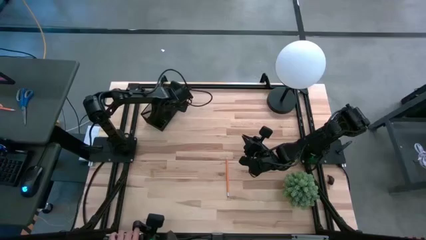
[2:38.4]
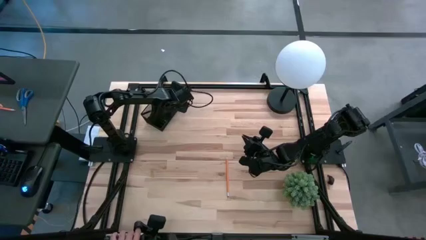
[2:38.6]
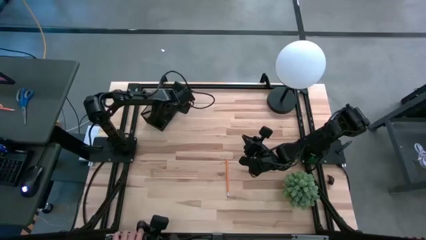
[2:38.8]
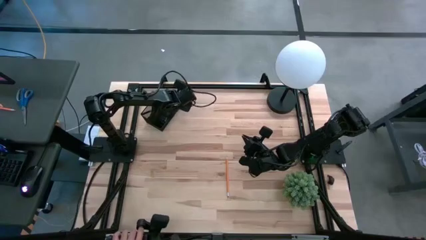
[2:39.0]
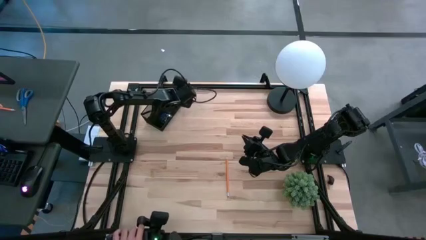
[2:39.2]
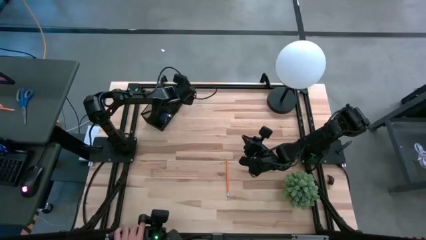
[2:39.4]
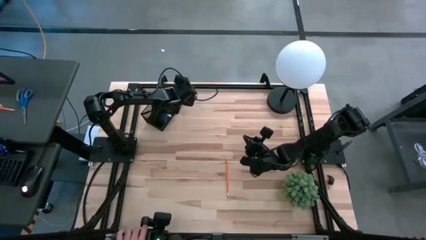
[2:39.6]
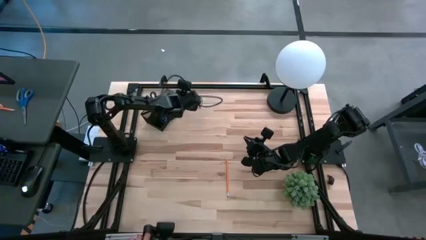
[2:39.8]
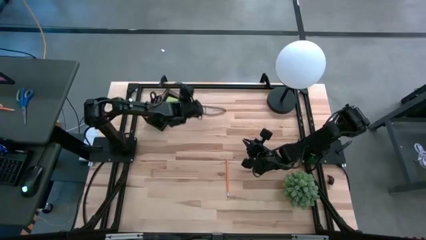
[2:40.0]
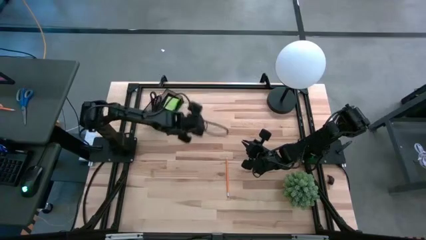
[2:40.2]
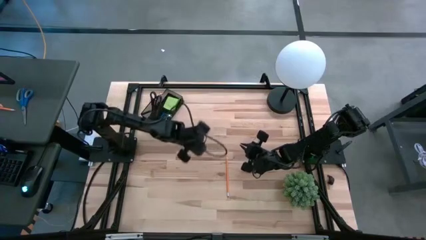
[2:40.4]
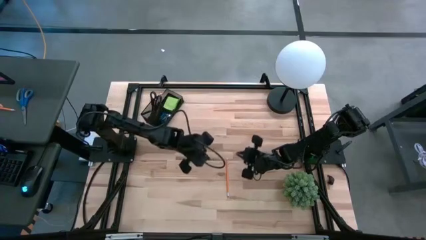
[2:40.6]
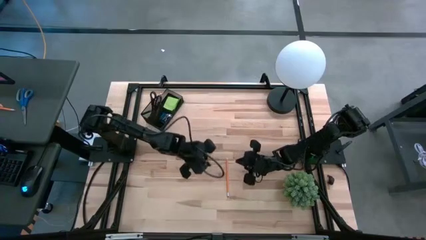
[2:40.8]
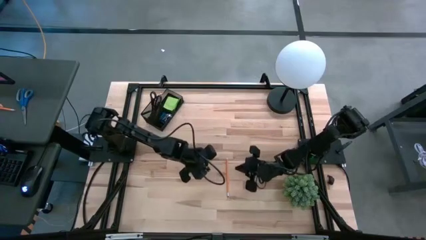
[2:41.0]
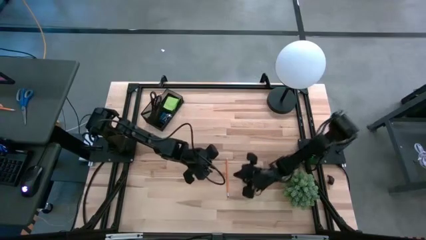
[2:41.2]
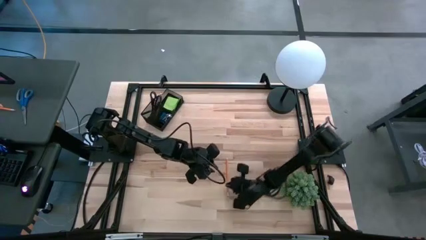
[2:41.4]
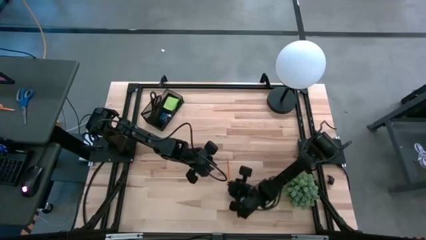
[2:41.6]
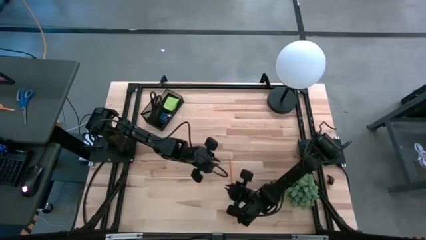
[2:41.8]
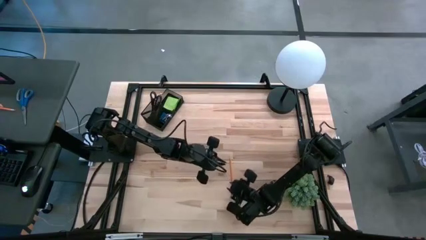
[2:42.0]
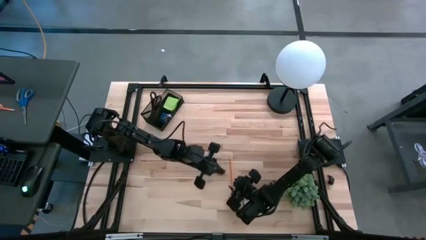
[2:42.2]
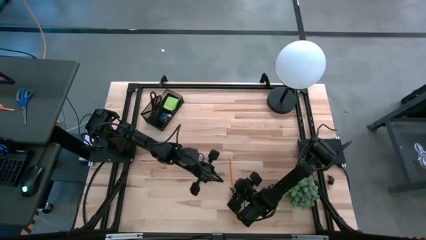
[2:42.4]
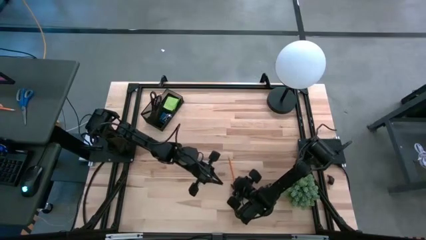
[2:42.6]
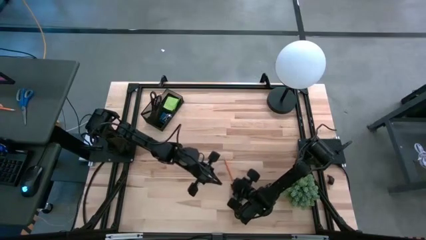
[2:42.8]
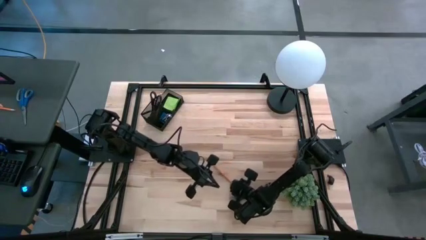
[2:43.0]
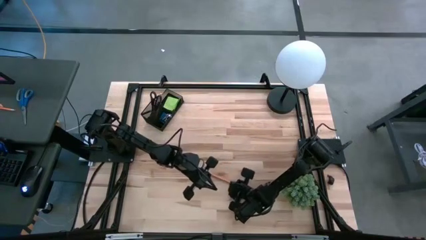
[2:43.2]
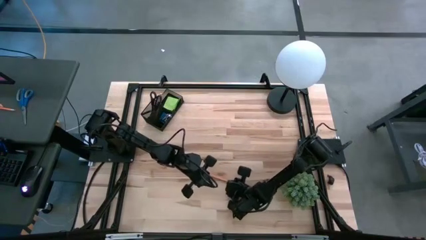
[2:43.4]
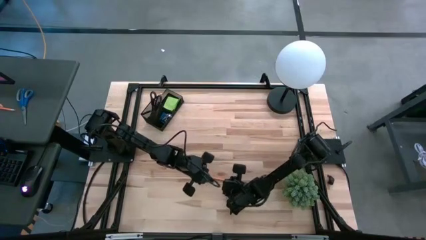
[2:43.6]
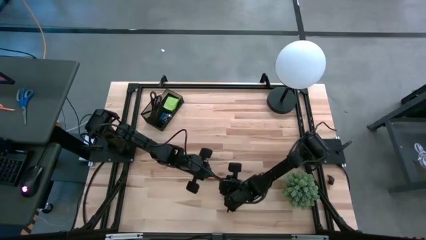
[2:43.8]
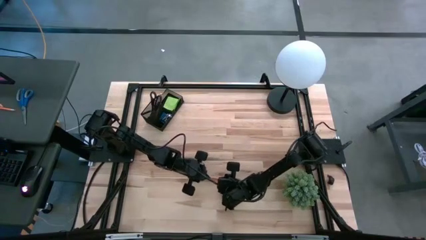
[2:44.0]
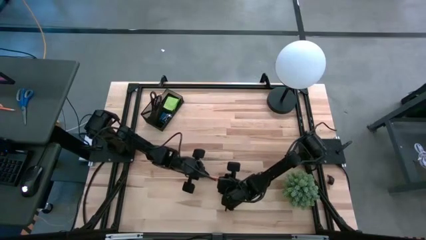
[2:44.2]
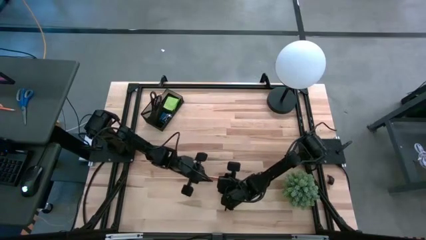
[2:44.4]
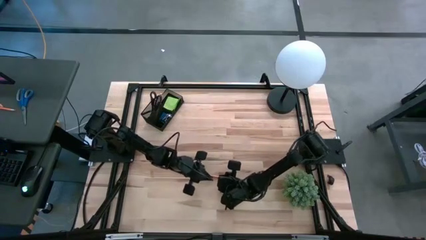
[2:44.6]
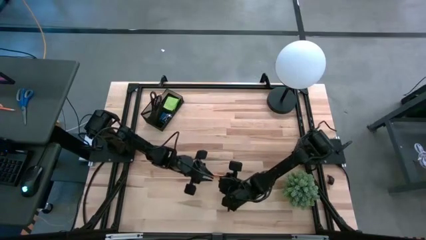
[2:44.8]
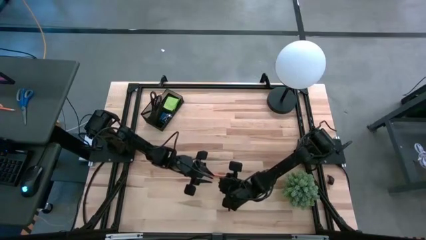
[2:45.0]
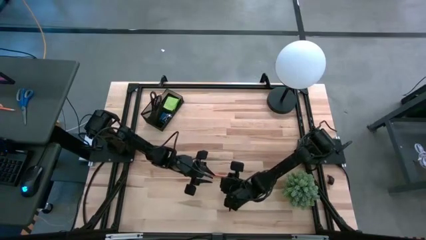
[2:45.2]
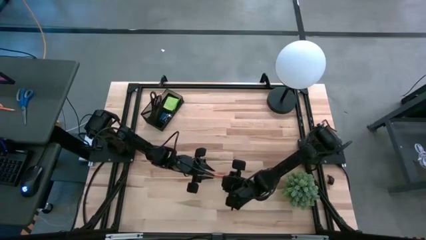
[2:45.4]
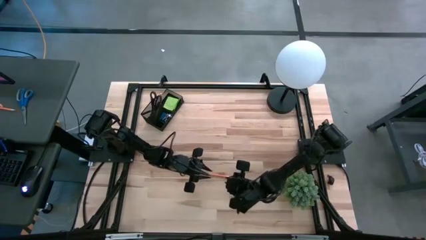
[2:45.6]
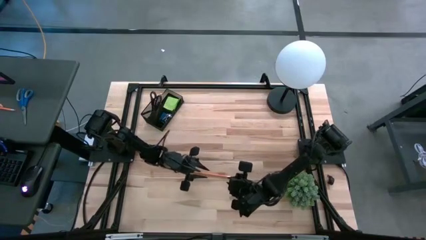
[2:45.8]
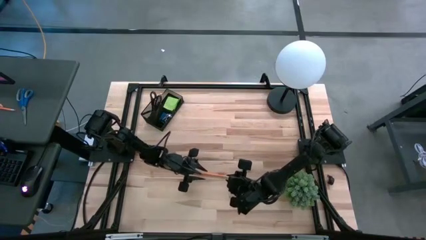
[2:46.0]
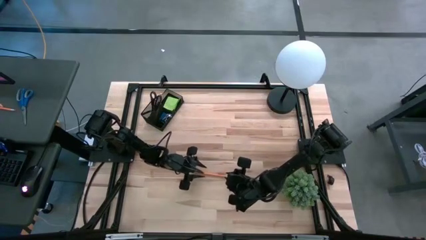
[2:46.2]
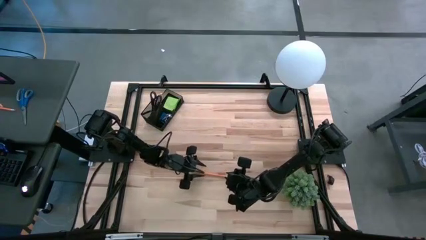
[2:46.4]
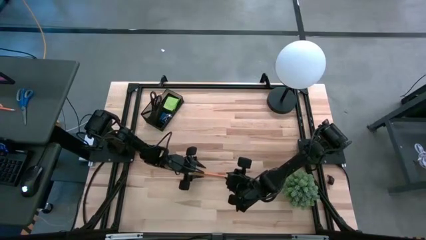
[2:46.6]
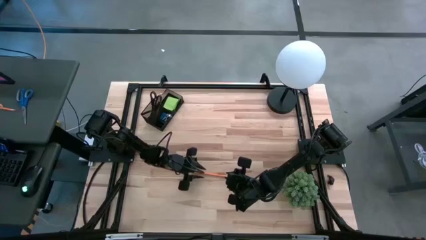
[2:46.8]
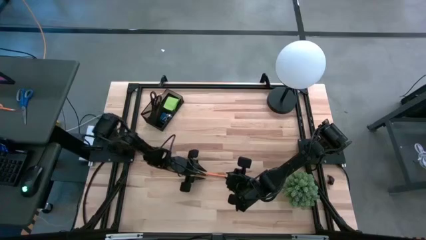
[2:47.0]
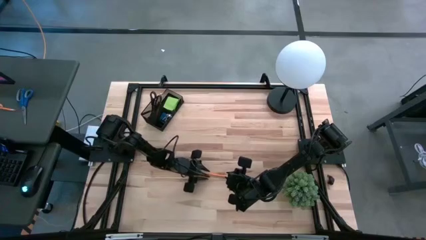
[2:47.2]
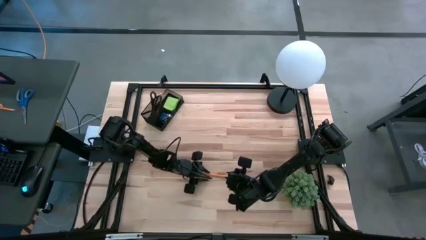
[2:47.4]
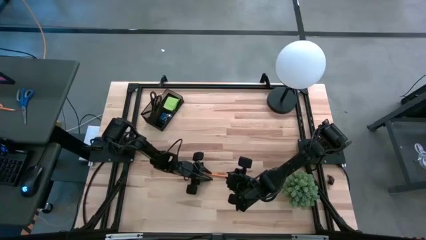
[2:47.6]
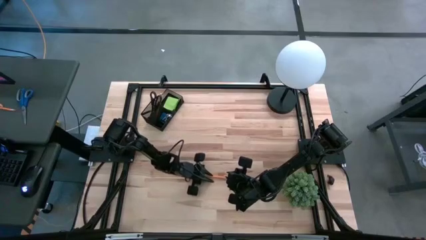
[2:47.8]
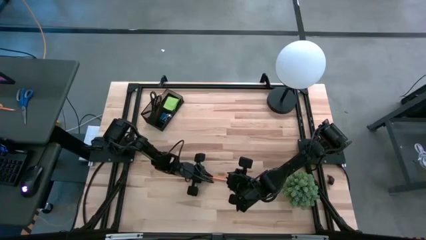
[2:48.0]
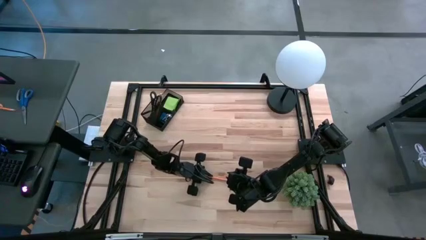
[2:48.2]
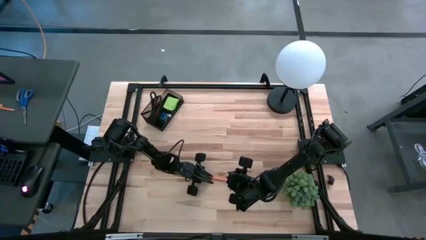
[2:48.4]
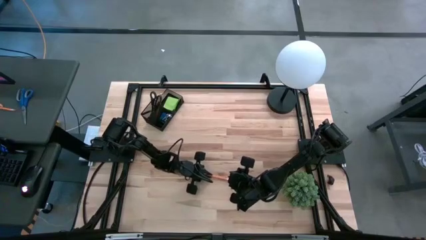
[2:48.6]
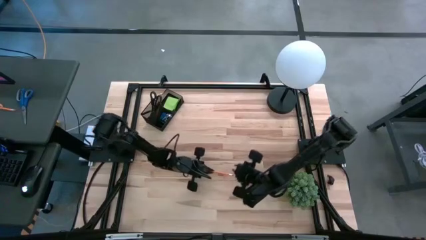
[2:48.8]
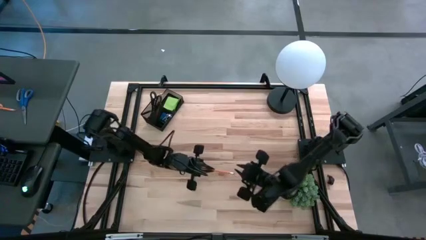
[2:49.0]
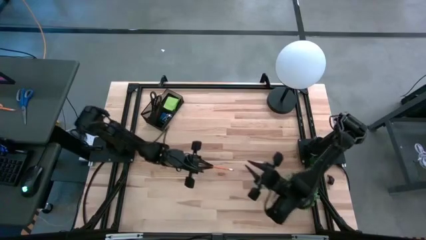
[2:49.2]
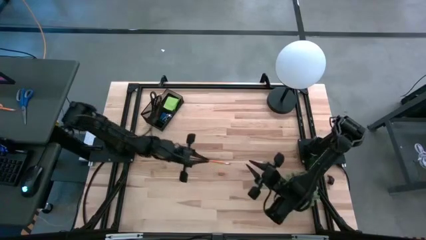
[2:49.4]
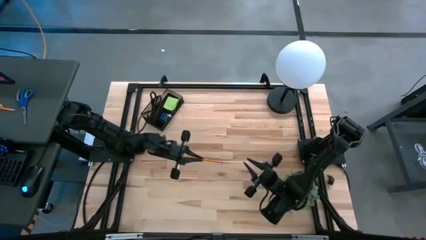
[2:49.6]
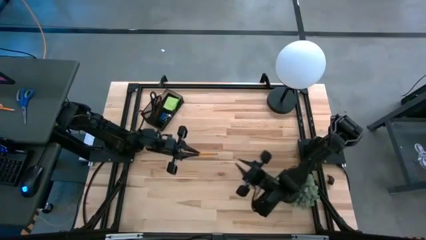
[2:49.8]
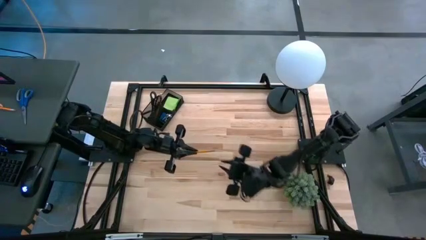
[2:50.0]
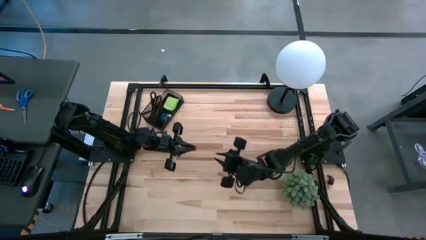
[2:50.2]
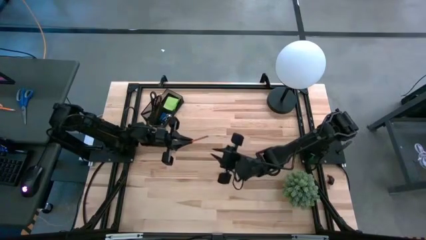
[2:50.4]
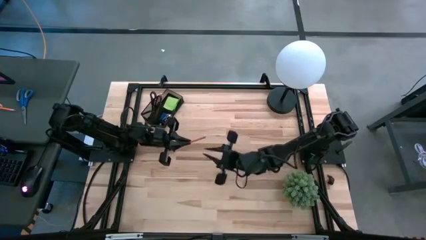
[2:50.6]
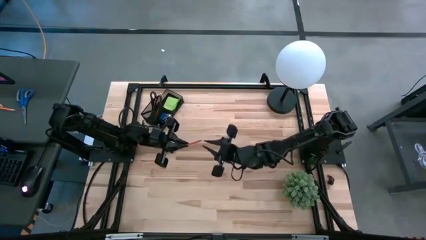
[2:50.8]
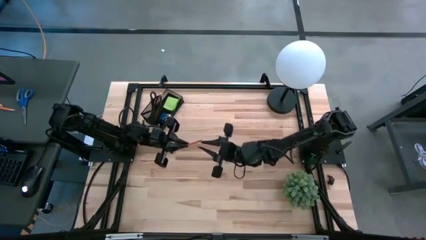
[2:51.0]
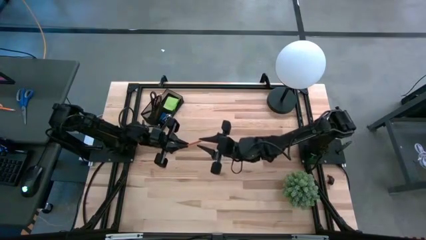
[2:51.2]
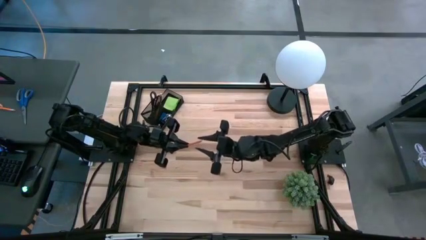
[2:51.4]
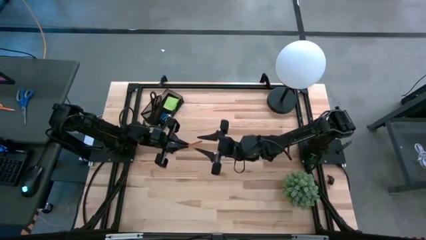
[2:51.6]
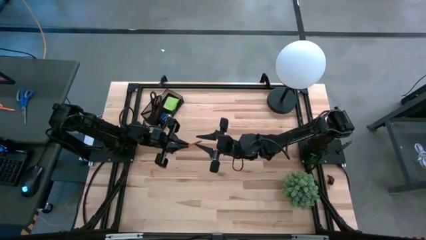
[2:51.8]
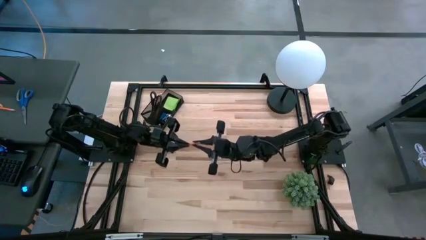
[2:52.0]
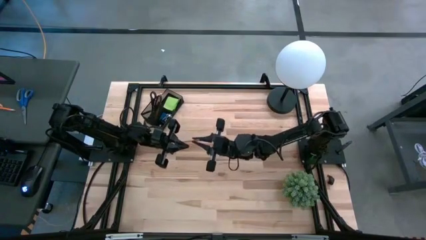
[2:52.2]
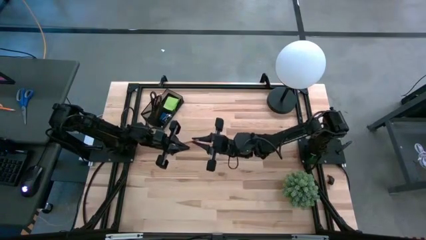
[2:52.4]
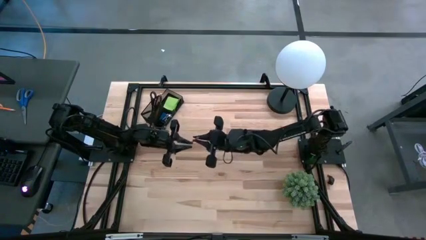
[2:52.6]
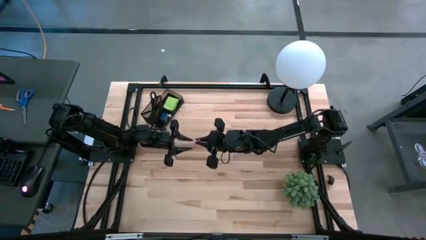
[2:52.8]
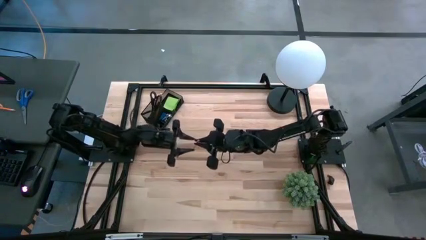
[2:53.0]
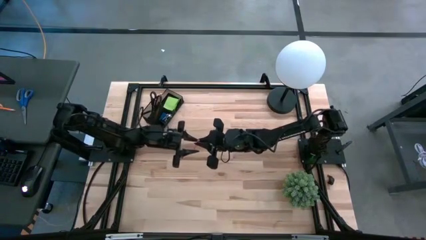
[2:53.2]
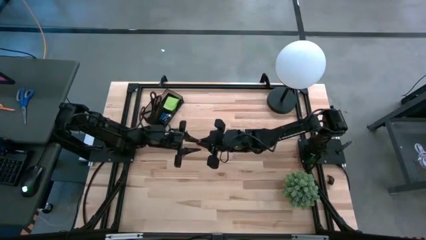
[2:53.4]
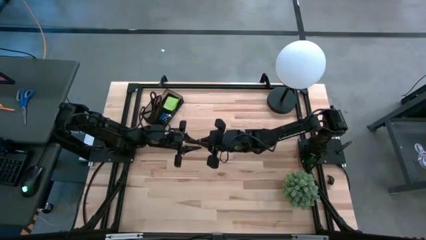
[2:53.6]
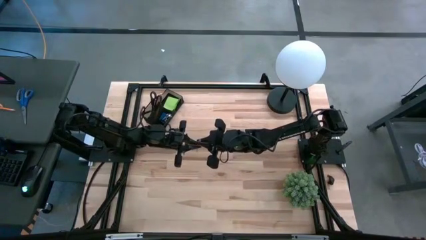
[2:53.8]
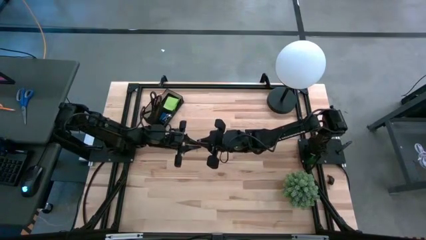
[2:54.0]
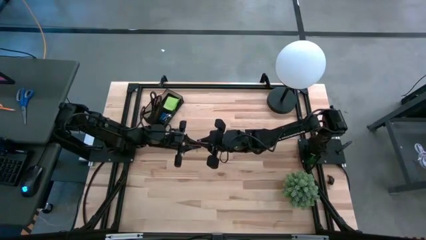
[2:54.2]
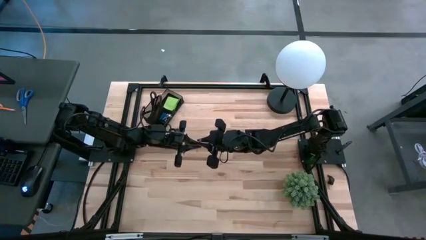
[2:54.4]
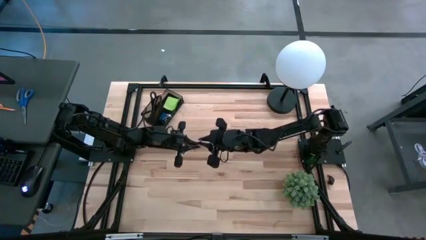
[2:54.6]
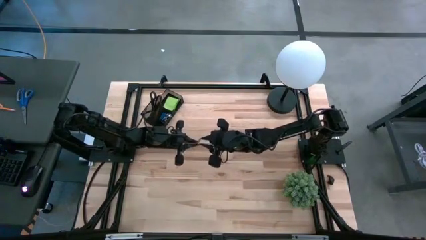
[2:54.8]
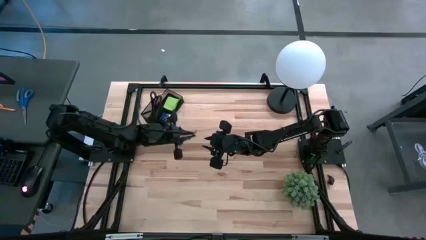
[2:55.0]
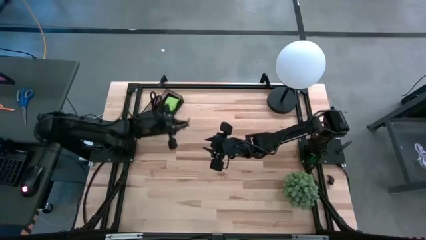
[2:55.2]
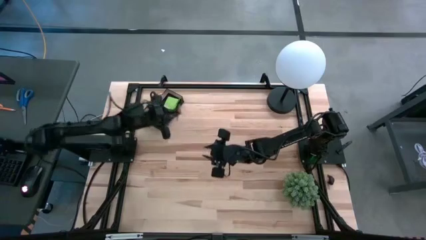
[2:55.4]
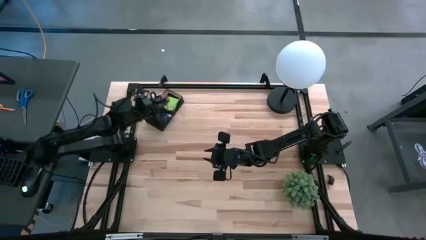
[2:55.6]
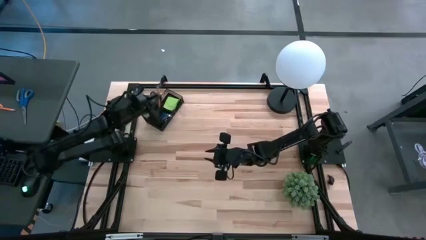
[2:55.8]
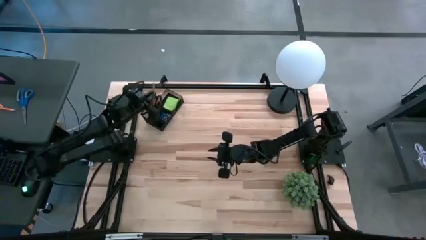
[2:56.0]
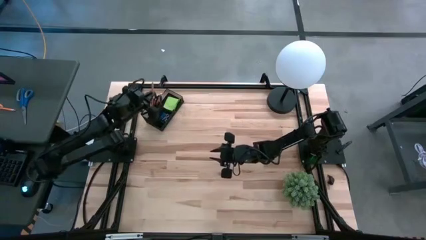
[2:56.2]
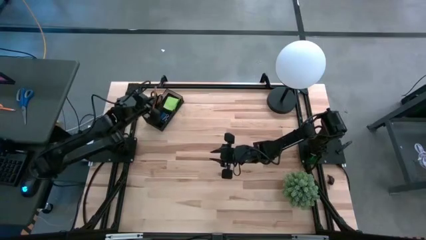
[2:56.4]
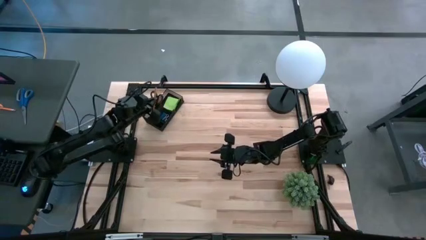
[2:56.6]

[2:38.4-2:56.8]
Task: Pick and place office supplies into organizer
Put the orange pencil into the top left section of the desk organizer
